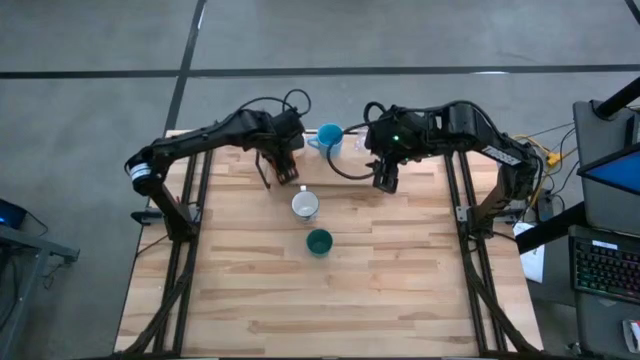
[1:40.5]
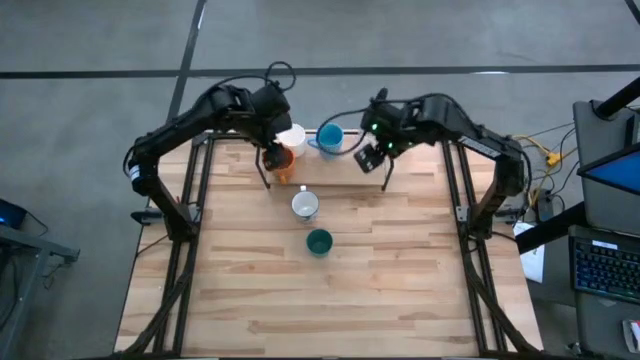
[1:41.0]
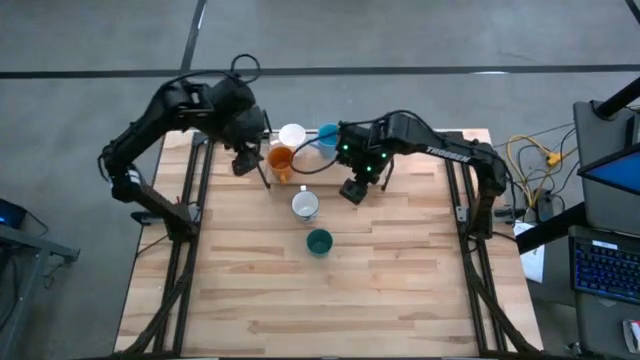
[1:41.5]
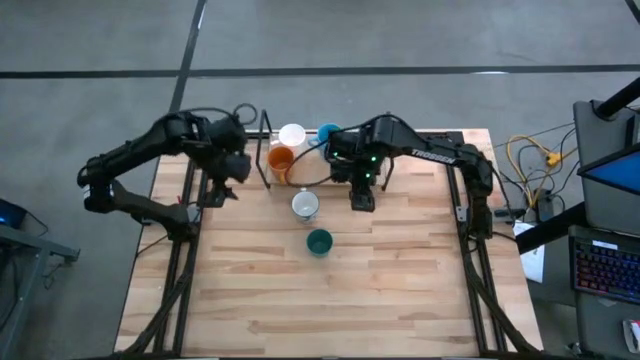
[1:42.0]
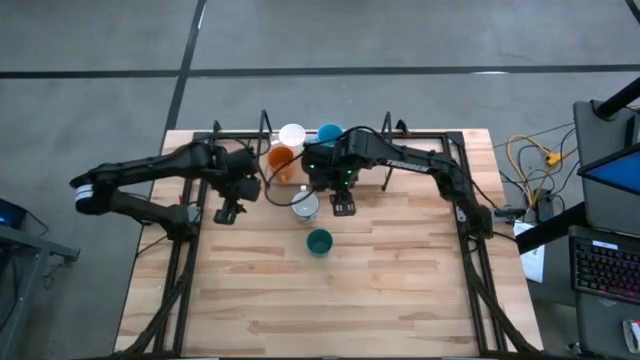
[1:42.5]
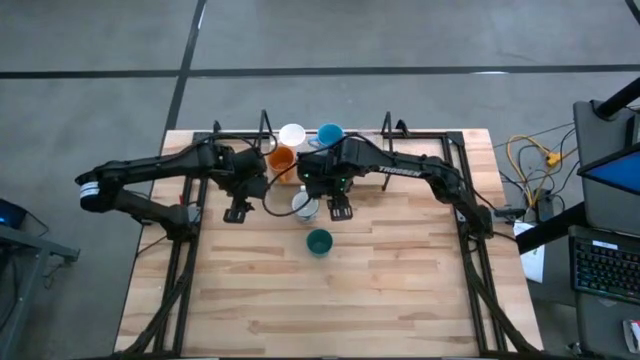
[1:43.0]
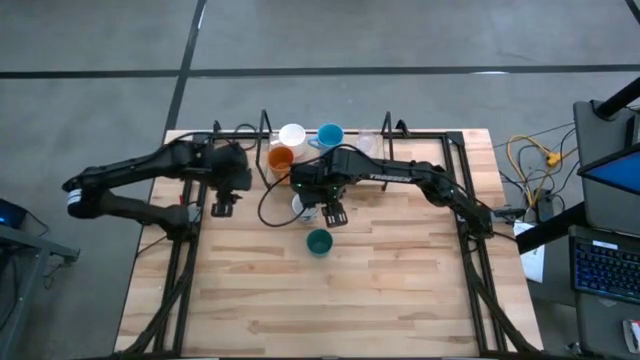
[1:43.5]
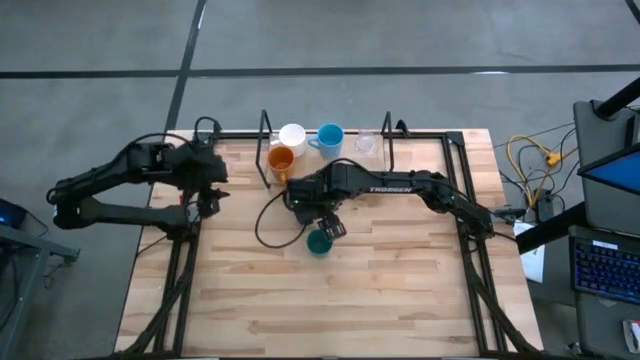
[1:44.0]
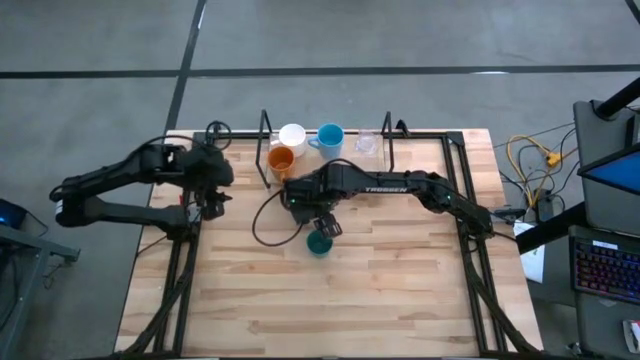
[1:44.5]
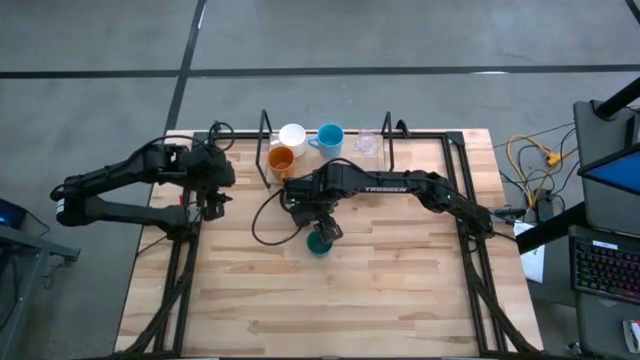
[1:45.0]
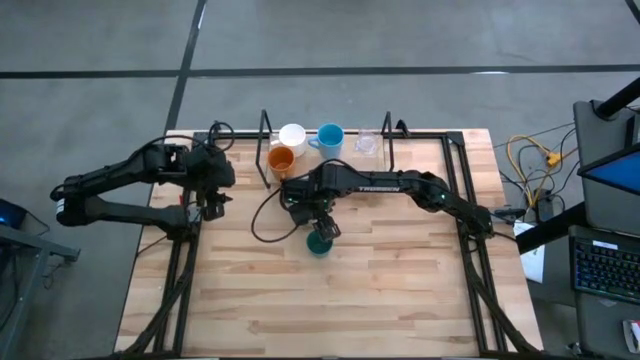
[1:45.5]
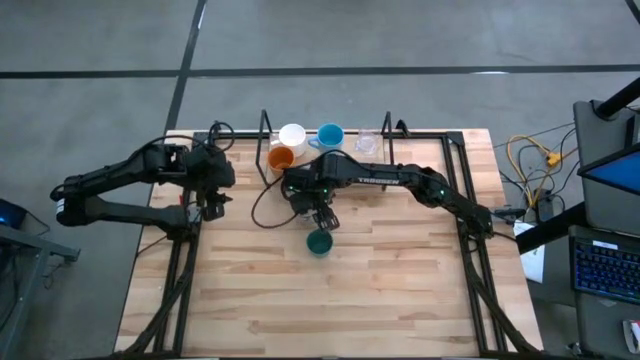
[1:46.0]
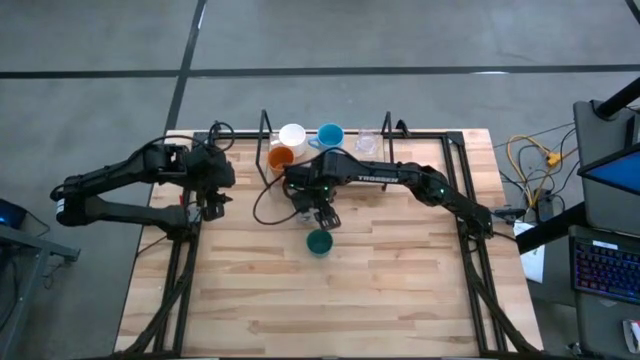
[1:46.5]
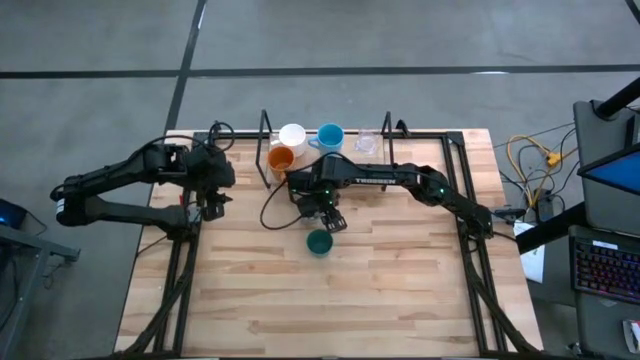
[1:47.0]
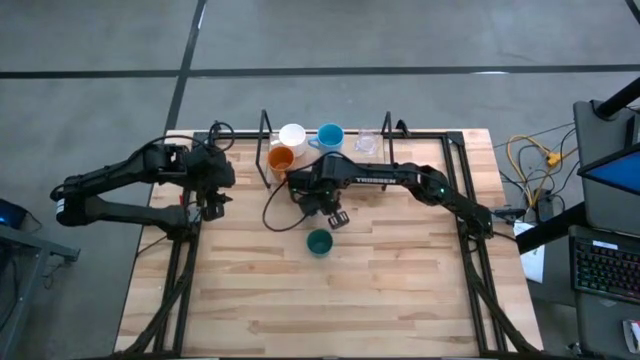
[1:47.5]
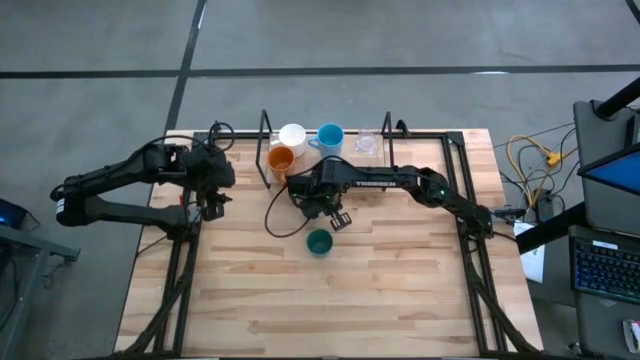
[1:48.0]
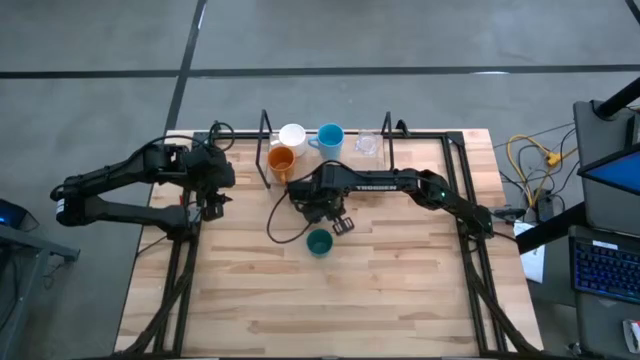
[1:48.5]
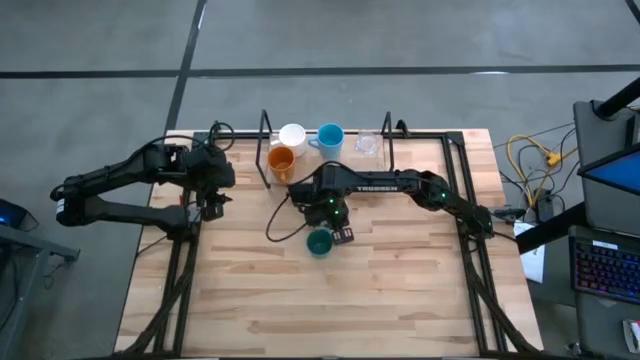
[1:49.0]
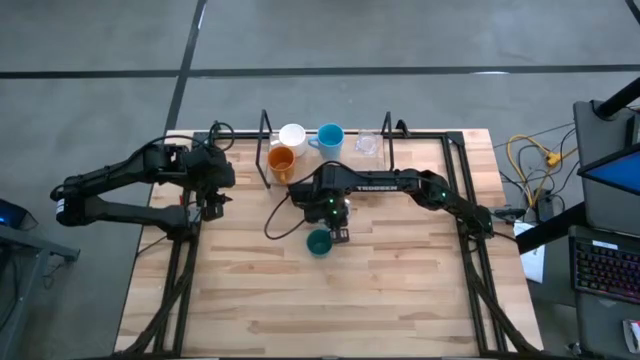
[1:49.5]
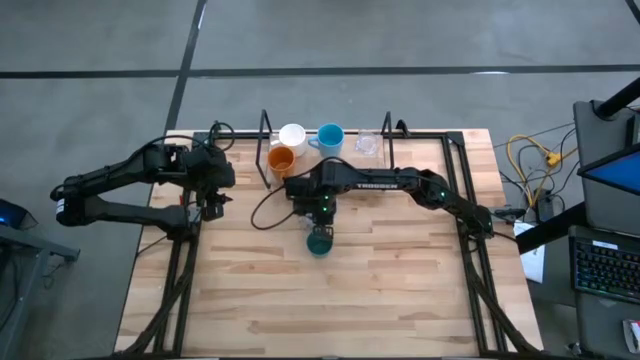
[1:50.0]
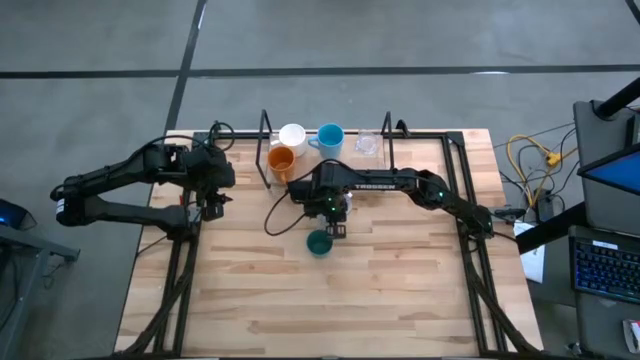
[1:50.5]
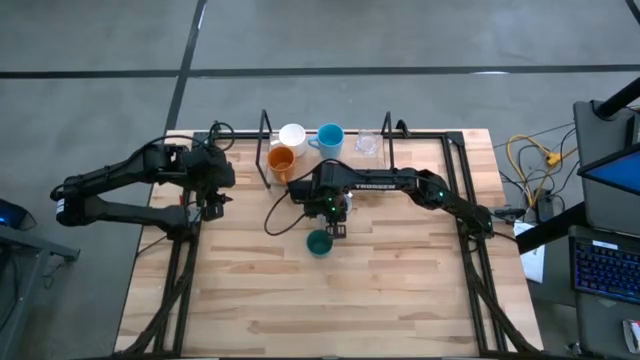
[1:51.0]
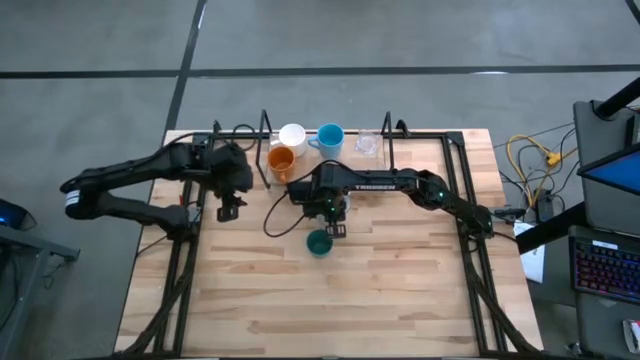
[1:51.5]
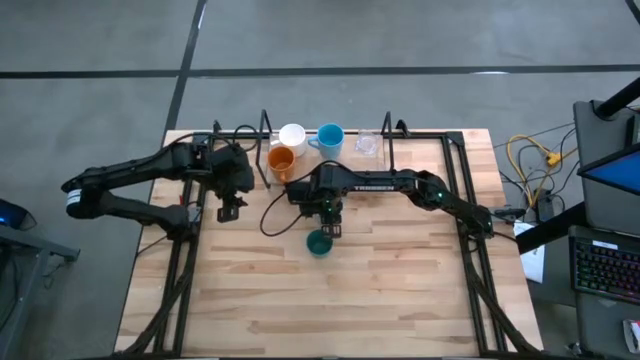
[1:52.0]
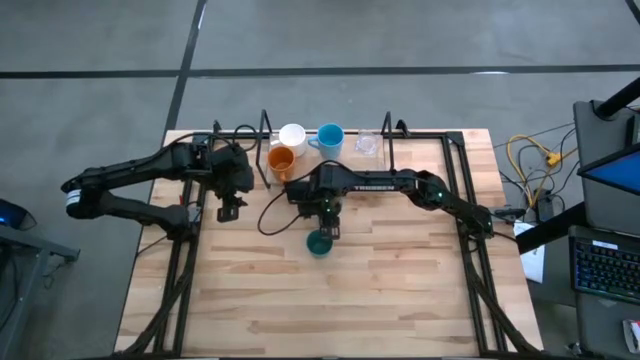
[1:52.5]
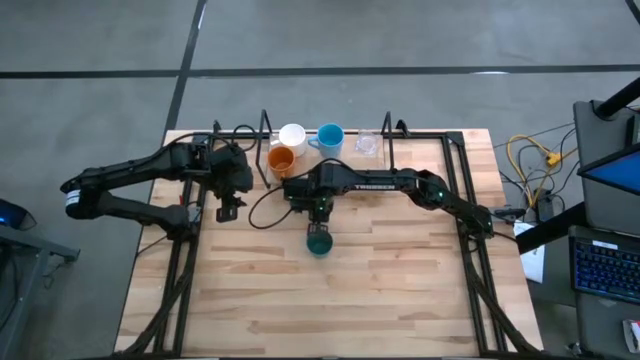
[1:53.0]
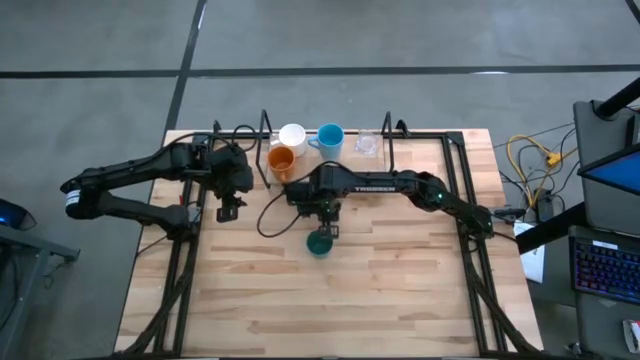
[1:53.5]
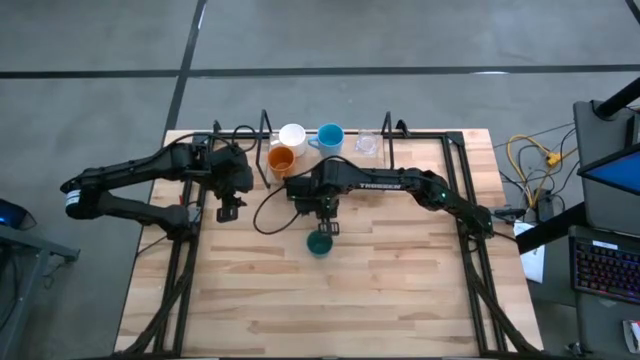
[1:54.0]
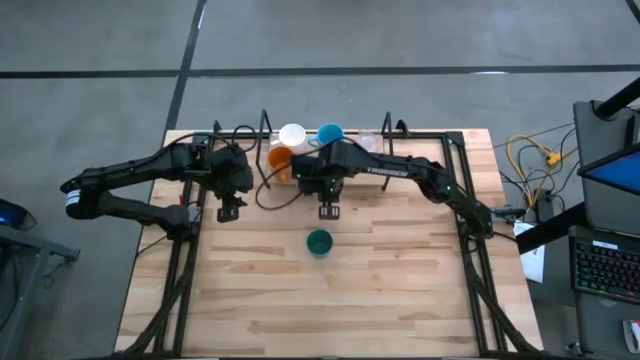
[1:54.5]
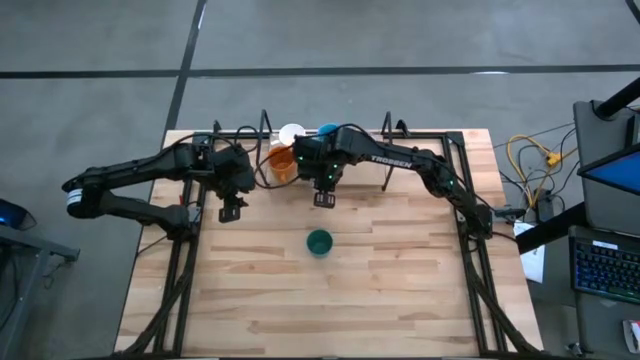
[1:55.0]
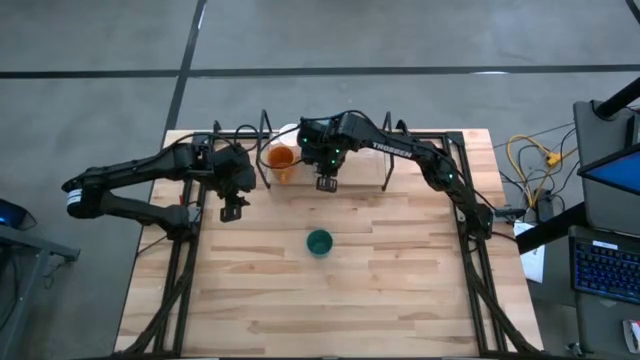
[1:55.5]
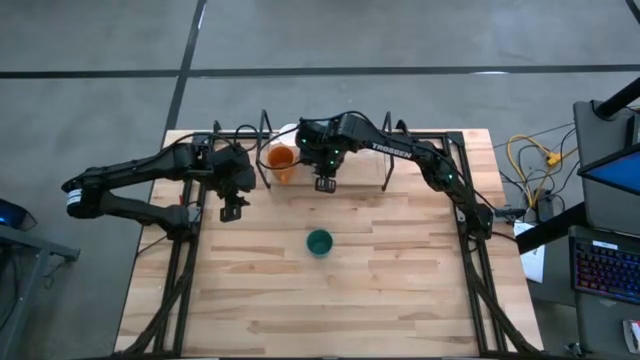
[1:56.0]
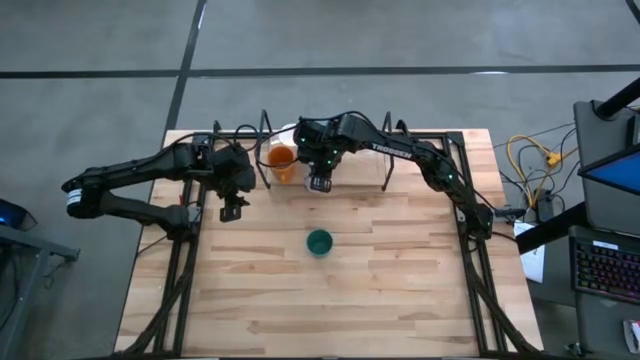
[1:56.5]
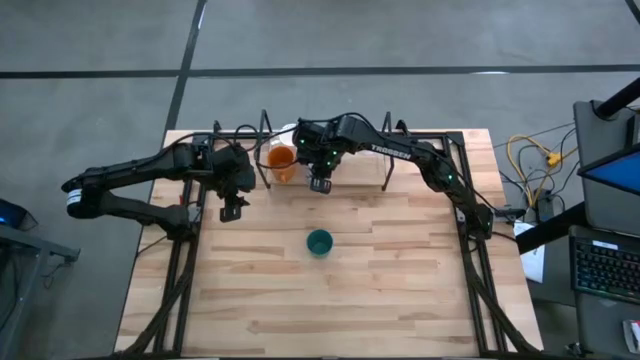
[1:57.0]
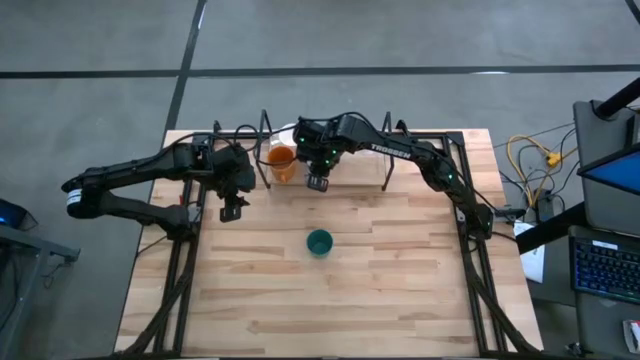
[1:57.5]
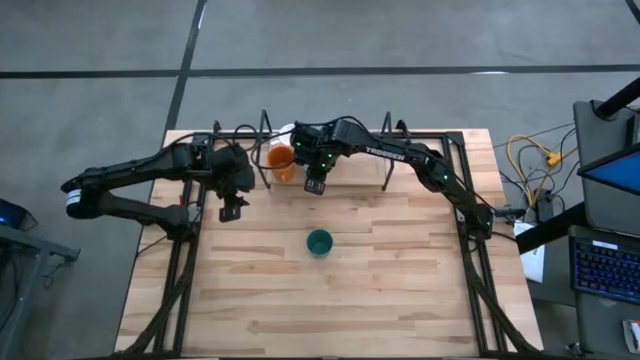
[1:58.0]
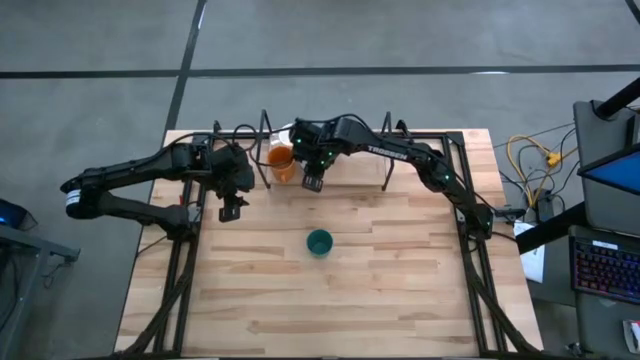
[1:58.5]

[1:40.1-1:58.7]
Task: Stack small to large cups/mugs on shelf
Put the blue mug on the shelf

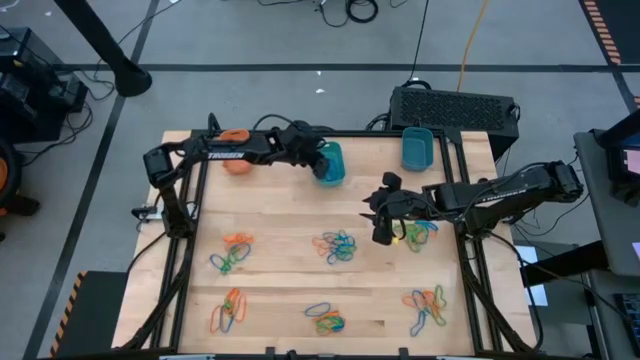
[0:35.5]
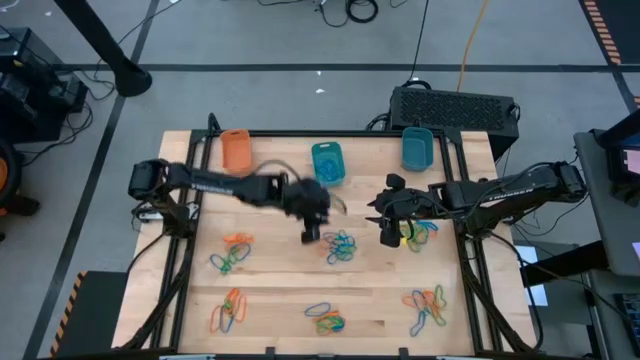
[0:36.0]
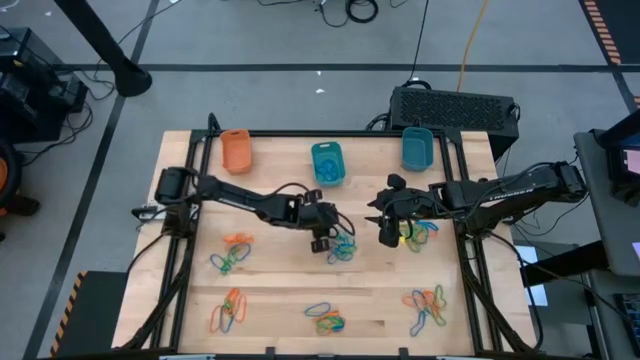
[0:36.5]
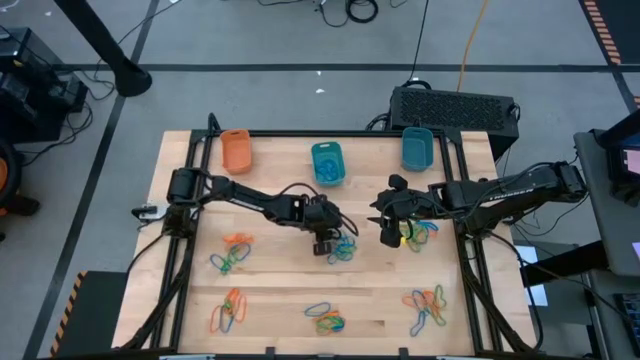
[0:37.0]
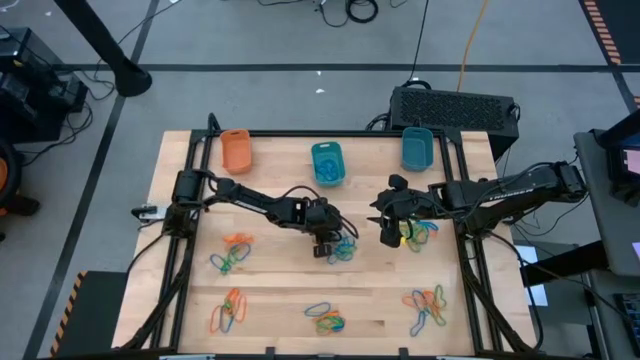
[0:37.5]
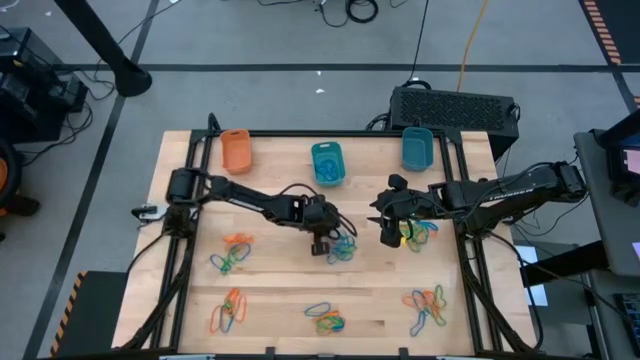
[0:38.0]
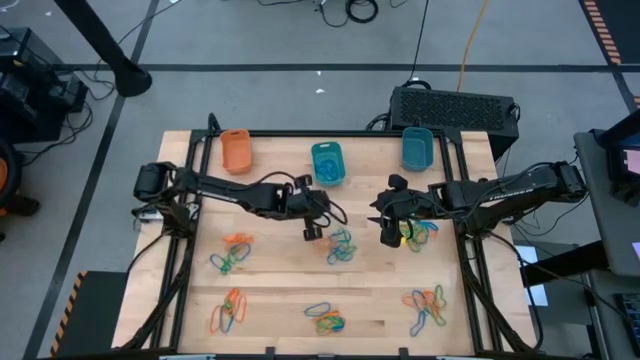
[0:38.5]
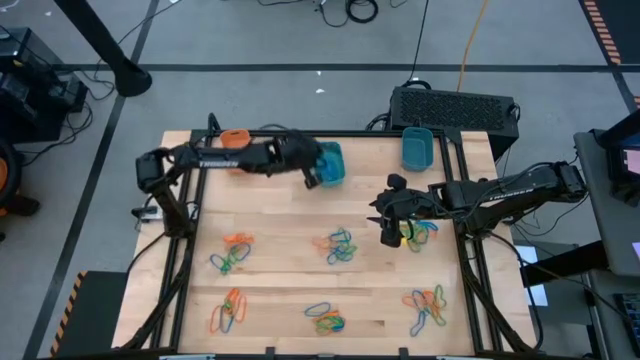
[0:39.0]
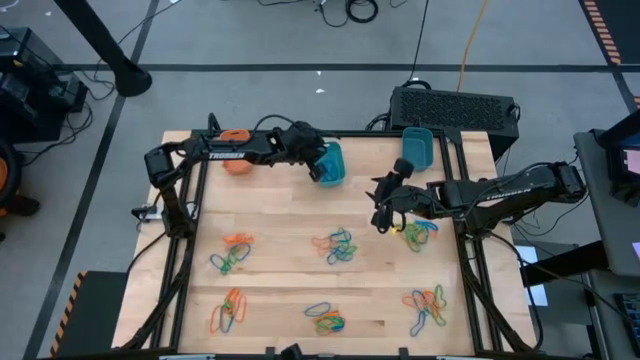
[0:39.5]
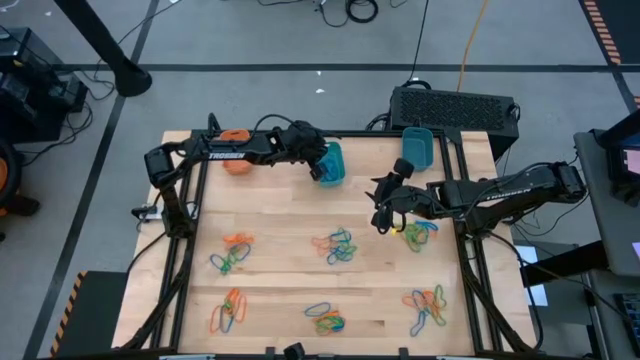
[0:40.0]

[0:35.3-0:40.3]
Task: Sort rubber bands into baskets
Put the blue rubber band into the light blue bin
